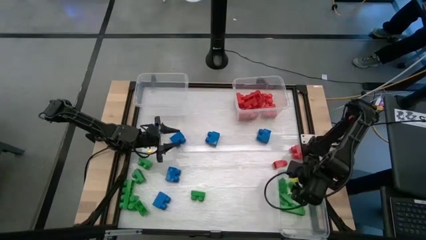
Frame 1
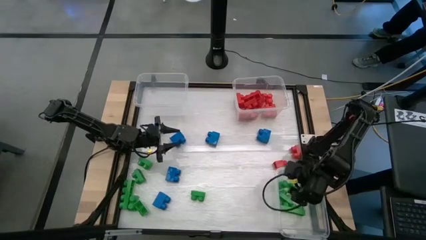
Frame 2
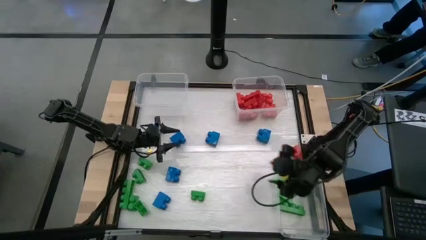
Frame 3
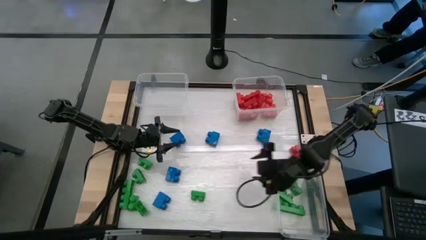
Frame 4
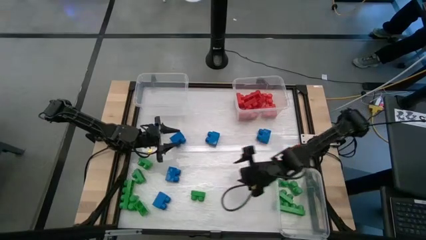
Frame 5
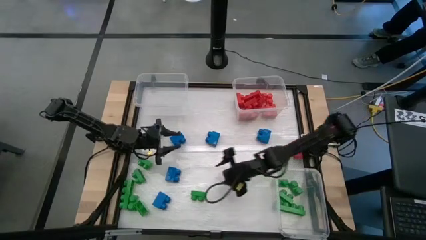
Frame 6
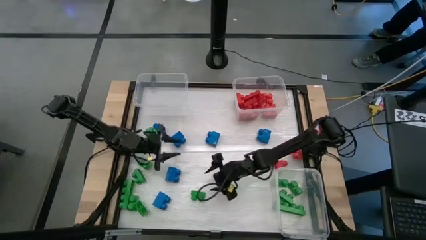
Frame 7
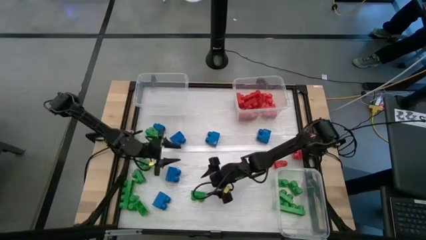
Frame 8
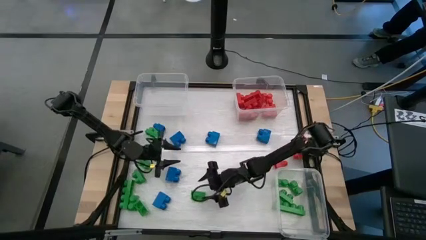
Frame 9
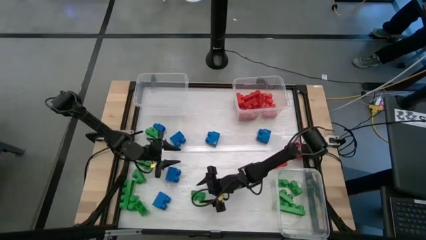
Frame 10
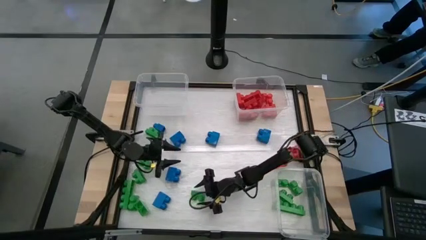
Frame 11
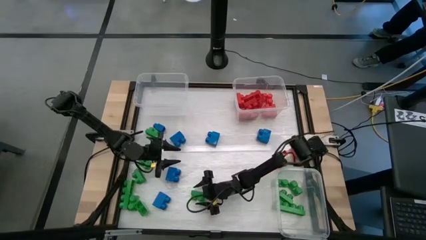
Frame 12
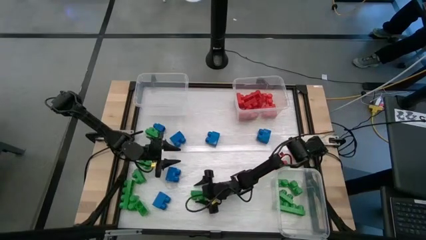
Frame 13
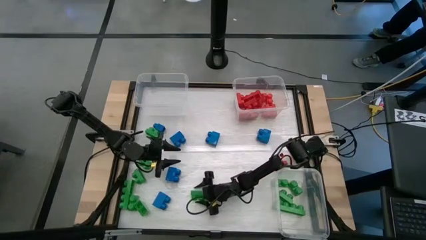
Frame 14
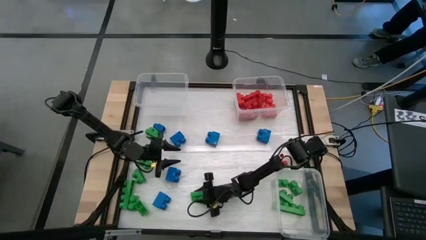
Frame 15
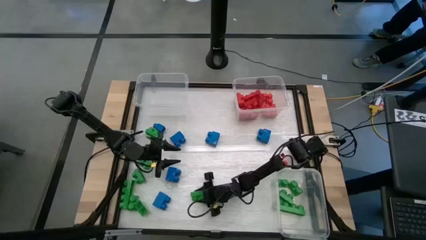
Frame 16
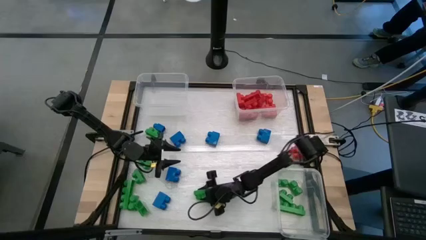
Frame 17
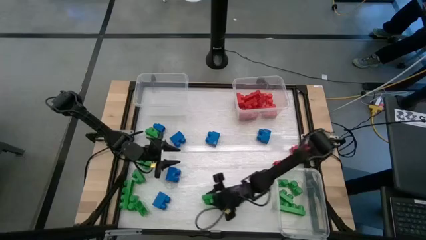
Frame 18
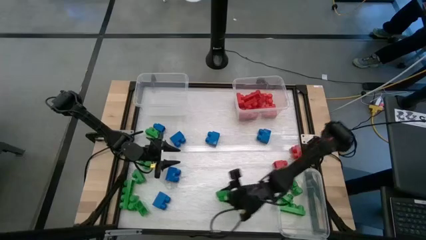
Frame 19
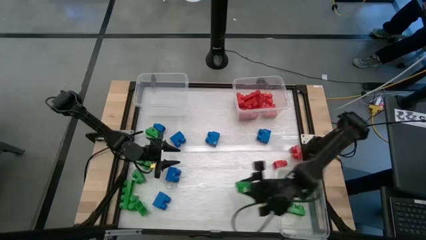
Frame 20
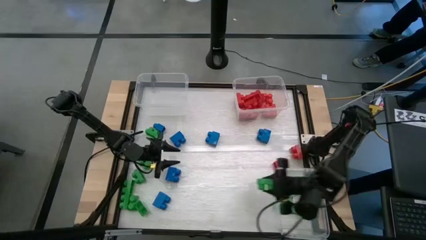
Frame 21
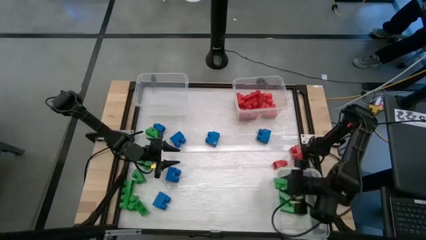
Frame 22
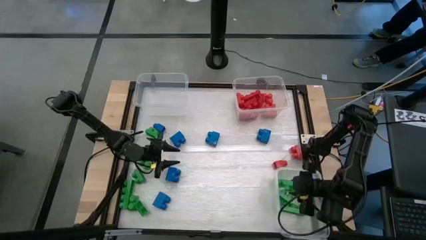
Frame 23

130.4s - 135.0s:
Task: Sort blocks
Put the green game piece into the bottom right transparent bin

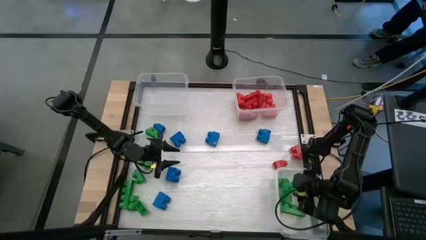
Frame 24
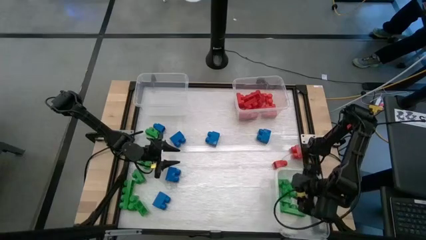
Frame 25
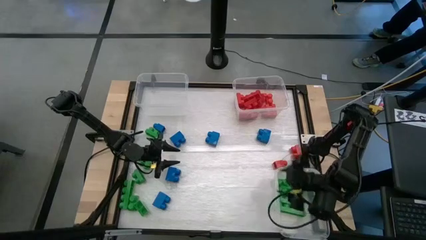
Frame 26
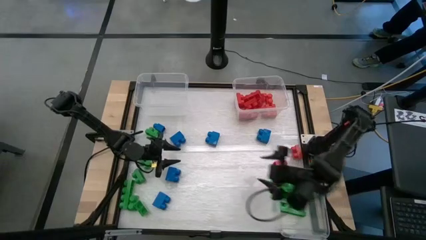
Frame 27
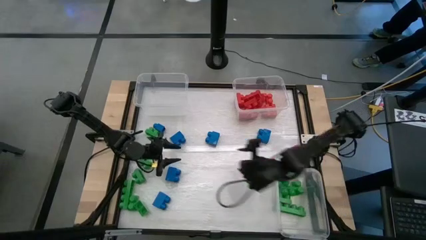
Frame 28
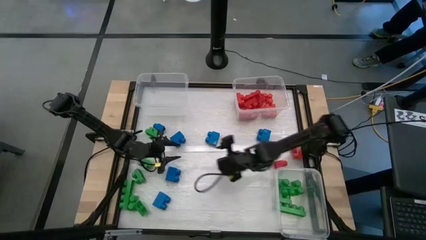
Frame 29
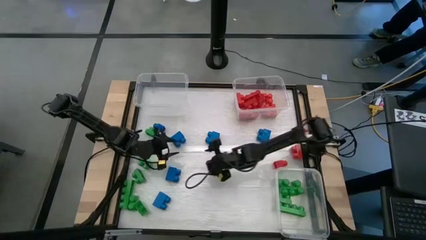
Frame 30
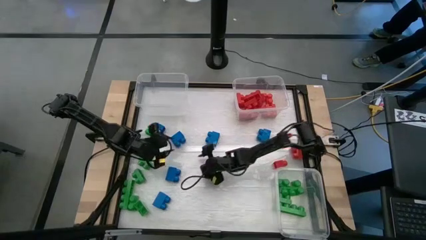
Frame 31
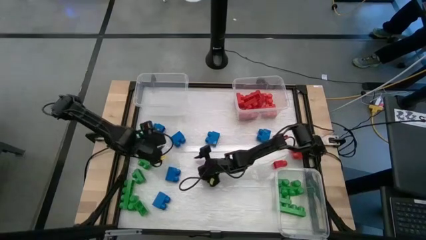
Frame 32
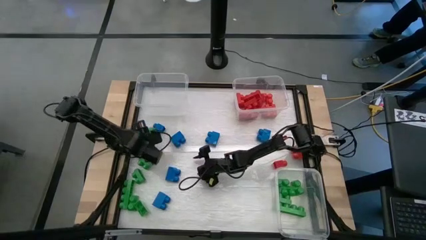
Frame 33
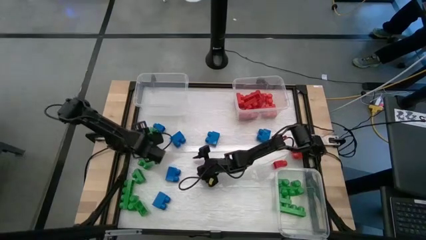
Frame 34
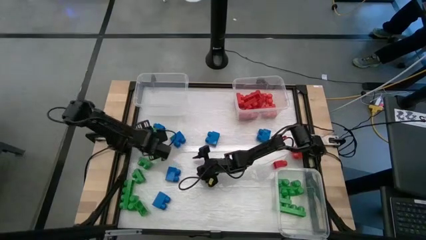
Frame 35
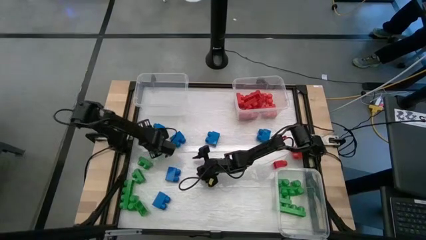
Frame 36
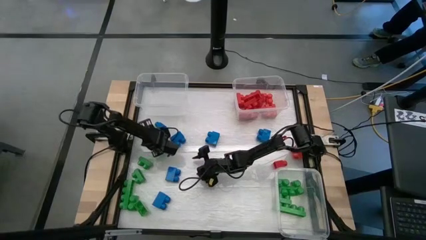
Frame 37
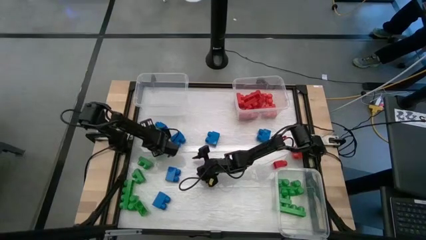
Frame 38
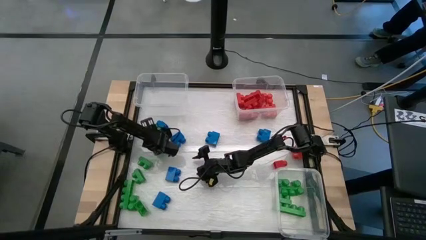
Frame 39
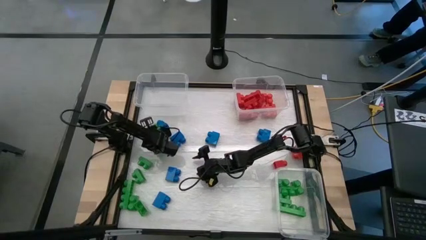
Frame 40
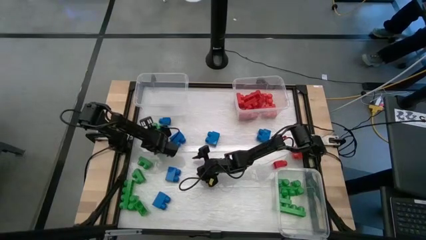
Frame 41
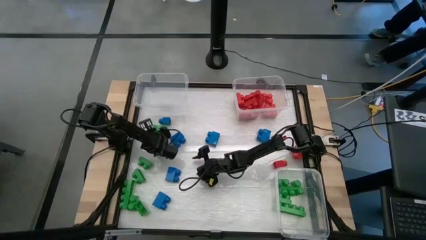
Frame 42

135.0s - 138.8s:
Put the green game piece into the bottom right transparent bin

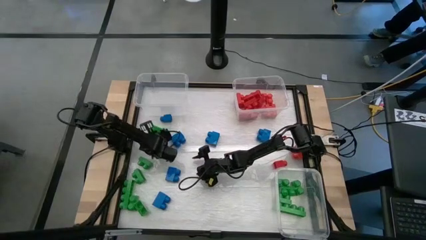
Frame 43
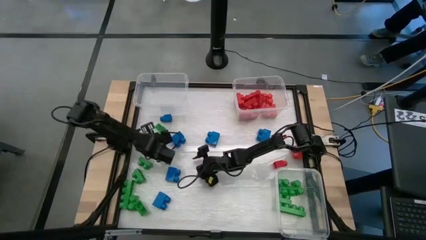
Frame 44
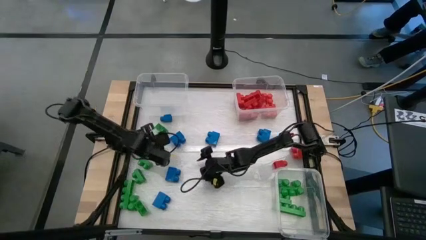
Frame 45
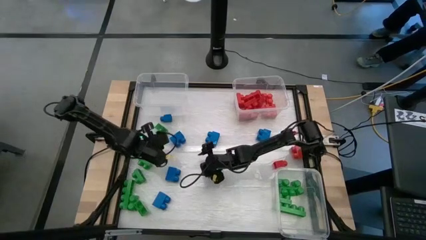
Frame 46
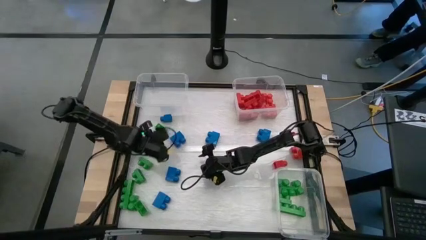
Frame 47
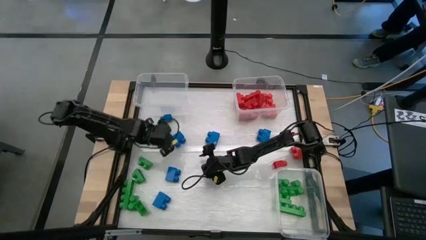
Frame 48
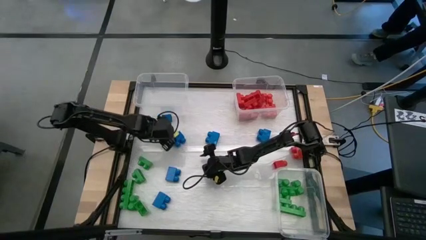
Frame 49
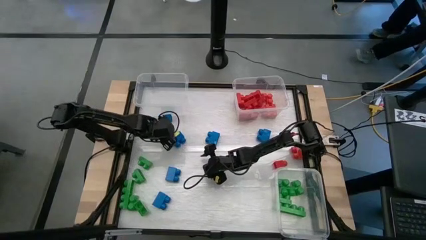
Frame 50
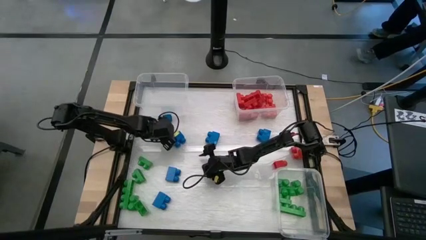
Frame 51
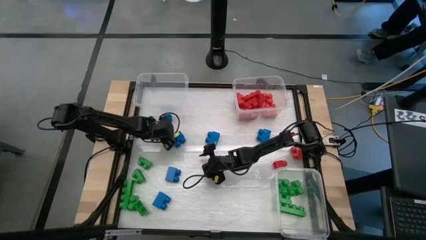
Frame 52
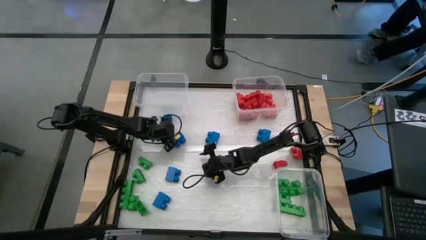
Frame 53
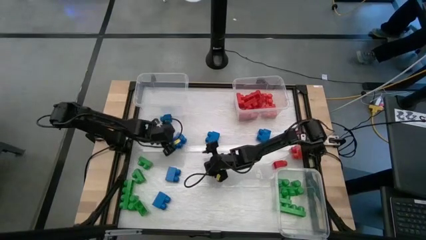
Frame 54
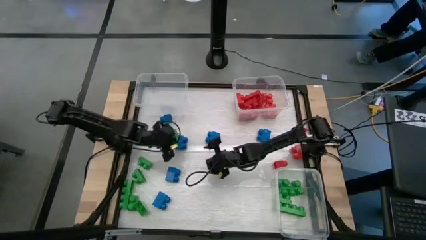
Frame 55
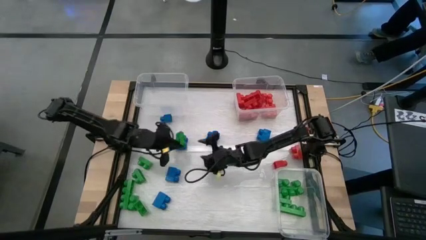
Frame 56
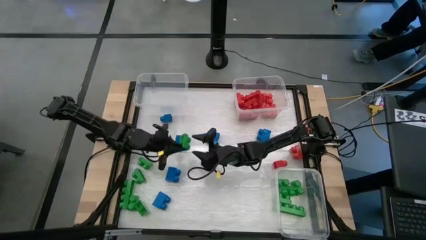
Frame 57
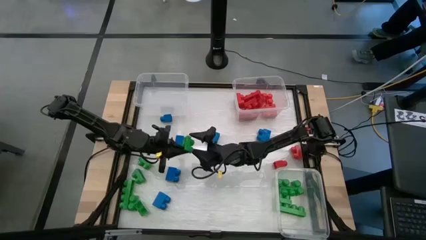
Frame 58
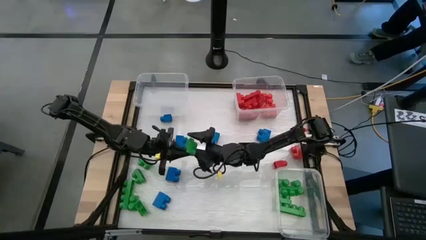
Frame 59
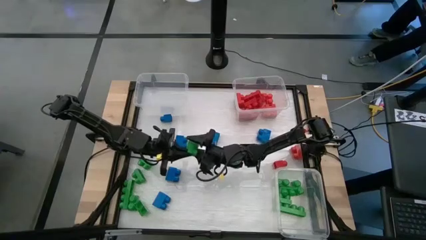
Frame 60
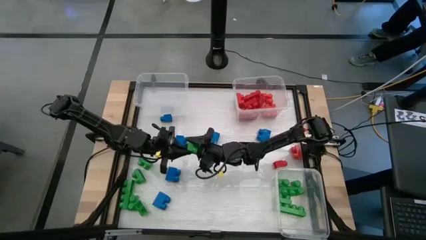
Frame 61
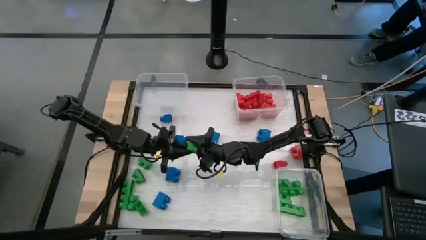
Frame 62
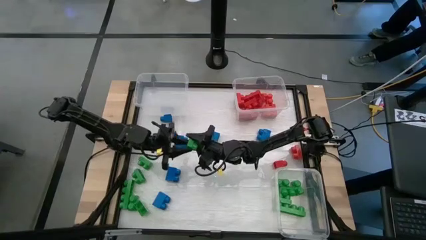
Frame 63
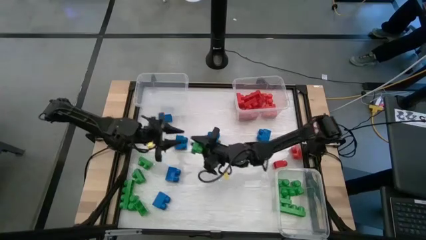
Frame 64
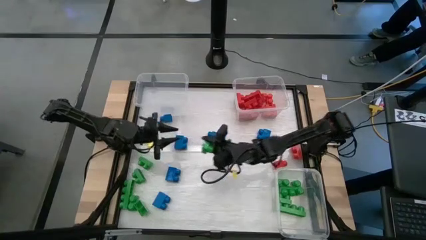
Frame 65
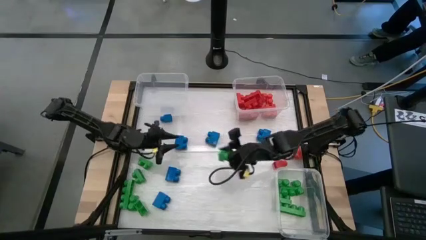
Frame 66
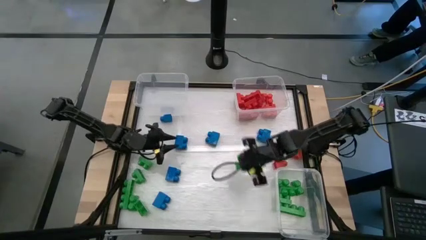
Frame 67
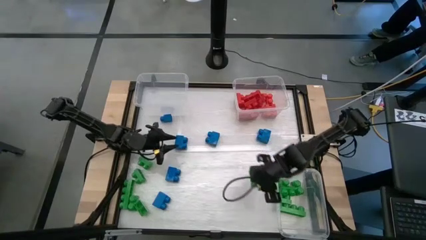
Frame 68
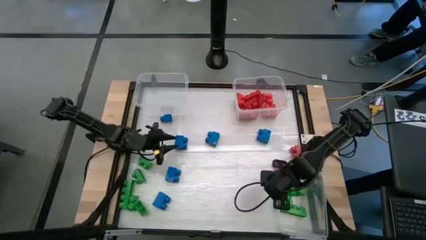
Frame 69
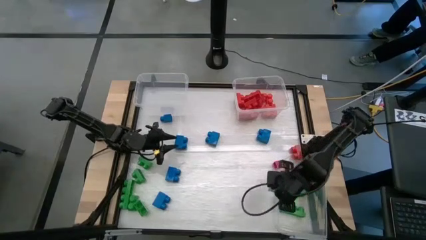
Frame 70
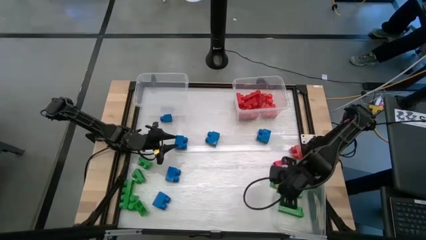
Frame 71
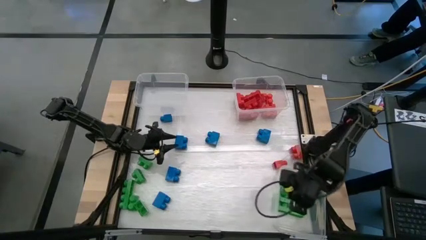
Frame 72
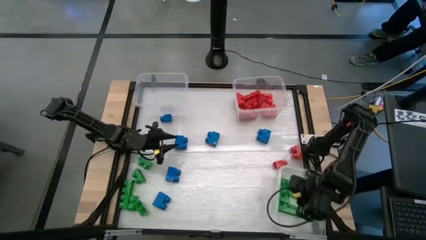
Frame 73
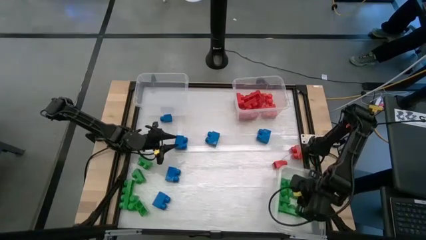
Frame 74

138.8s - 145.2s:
Put the green game piece into the bottom right transparent bin

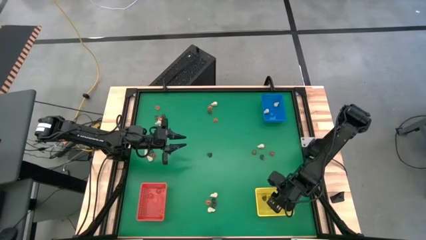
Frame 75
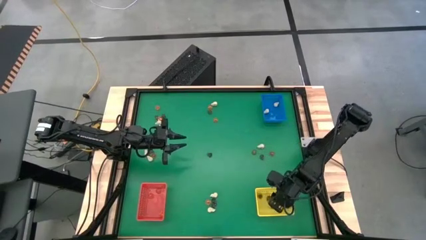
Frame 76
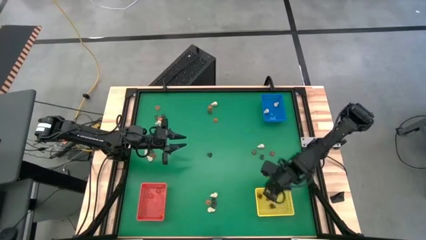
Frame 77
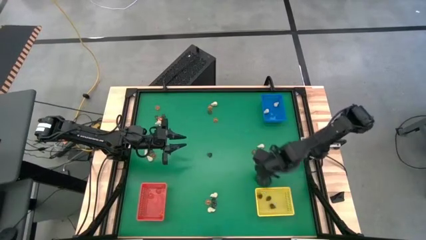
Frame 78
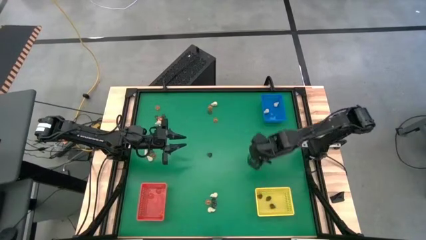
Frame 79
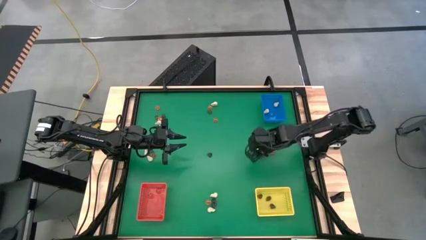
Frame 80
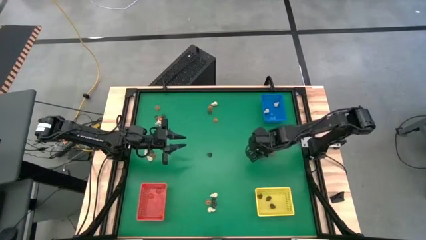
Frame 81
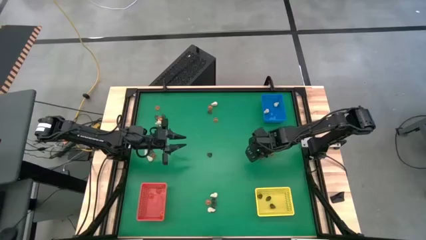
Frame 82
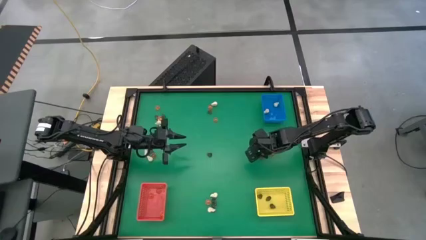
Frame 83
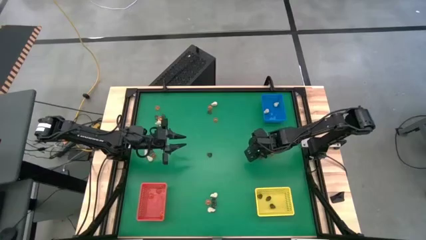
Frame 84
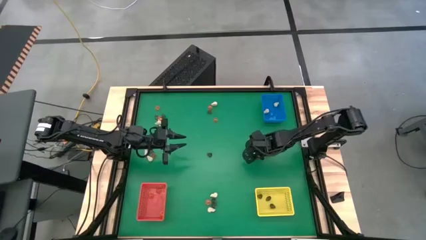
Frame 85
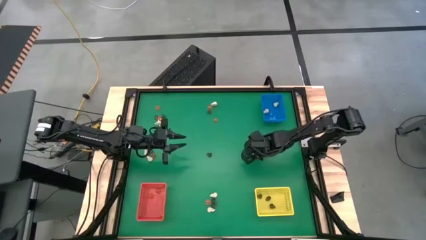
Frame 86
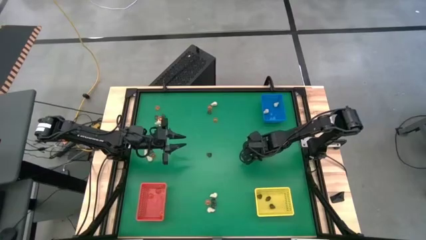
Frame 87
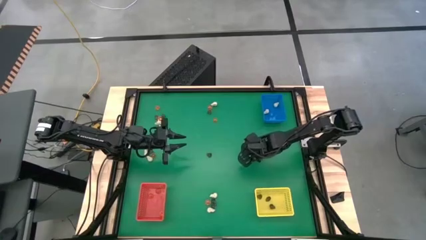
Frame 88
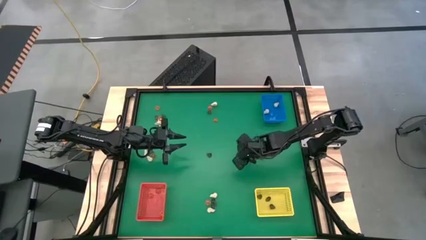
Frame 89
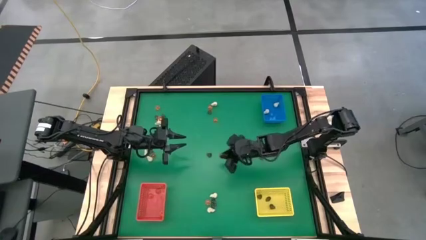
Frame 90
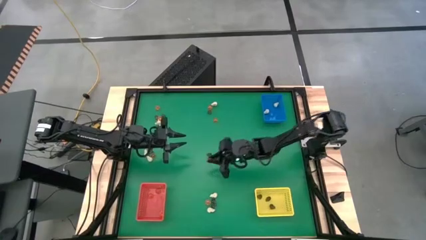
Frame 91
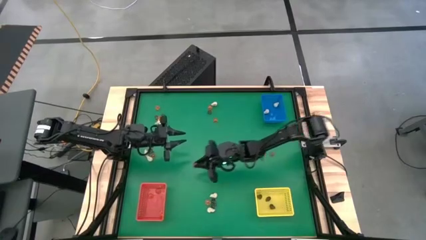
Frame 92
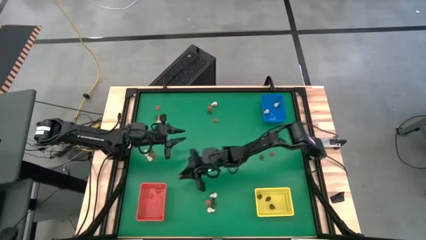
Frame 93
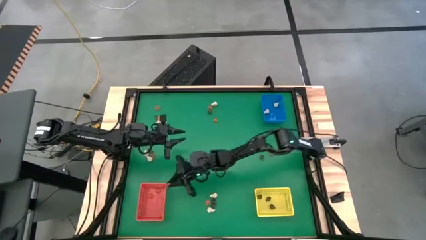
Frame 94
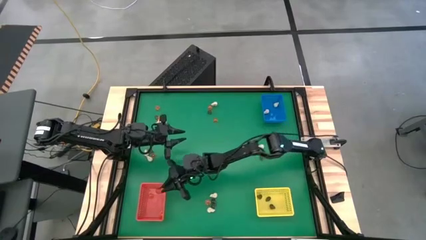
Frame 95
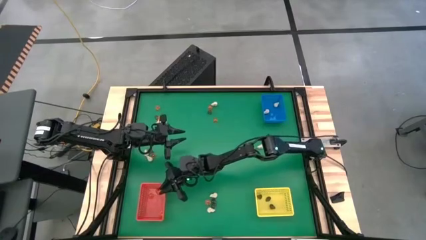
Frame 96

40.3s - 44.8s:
Task: Sort Halloween decoration
Put the orange pumpkin toy into the red bin
